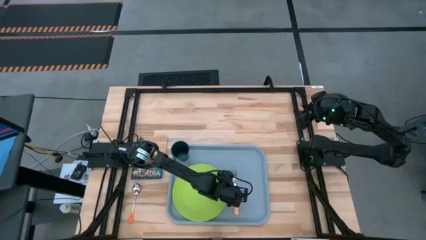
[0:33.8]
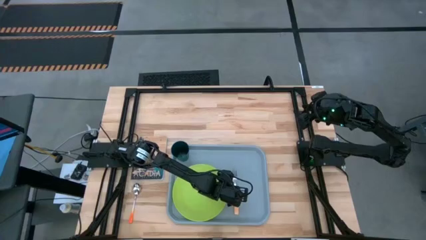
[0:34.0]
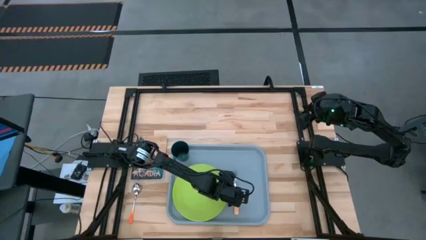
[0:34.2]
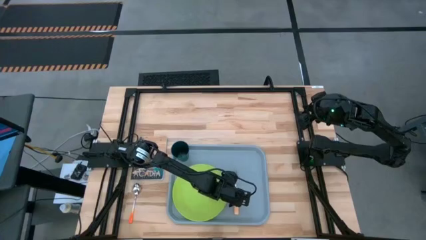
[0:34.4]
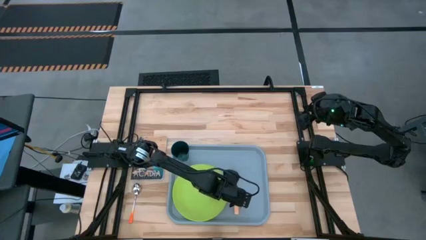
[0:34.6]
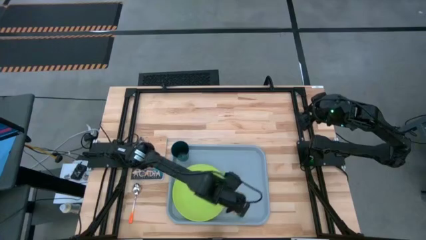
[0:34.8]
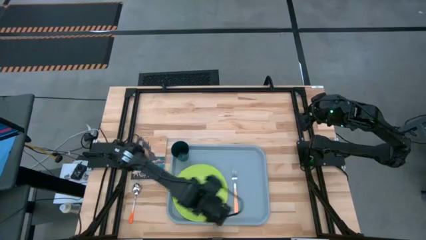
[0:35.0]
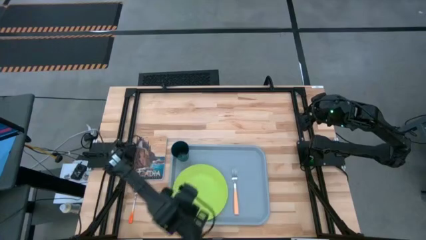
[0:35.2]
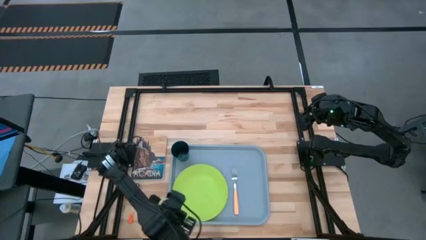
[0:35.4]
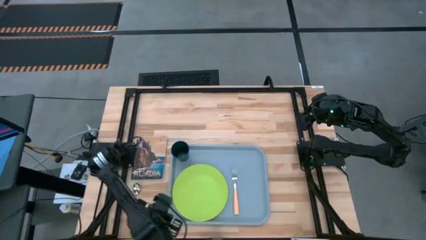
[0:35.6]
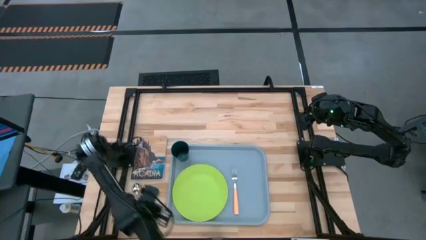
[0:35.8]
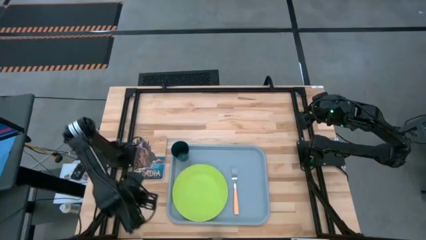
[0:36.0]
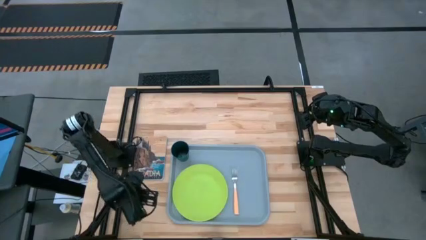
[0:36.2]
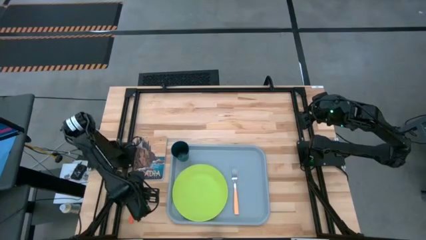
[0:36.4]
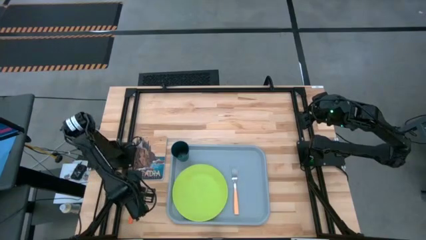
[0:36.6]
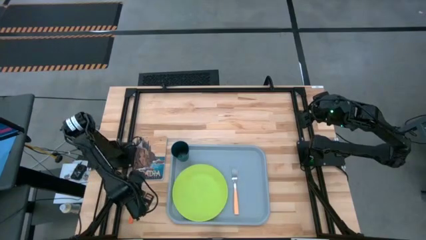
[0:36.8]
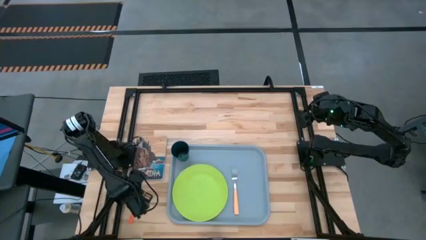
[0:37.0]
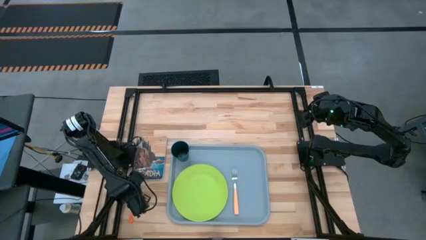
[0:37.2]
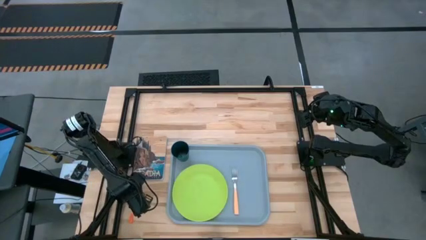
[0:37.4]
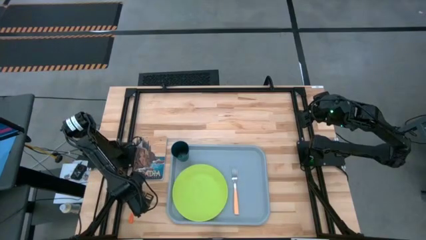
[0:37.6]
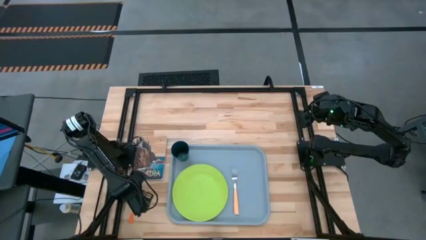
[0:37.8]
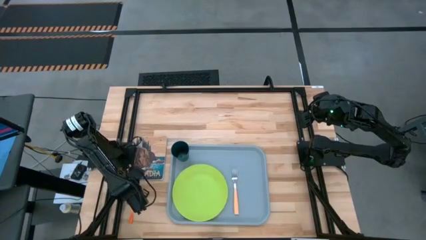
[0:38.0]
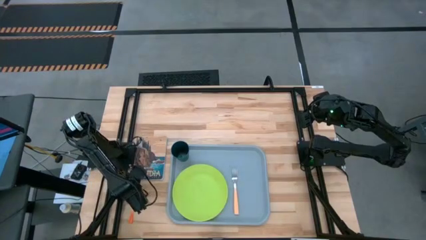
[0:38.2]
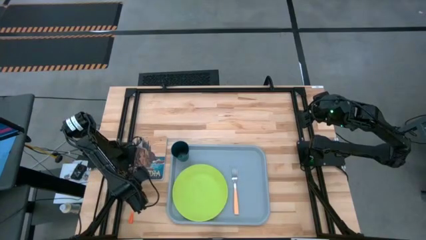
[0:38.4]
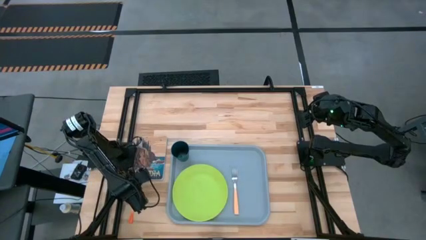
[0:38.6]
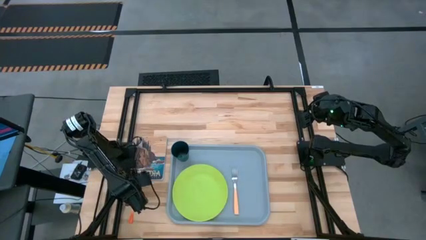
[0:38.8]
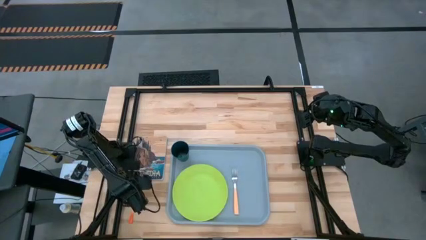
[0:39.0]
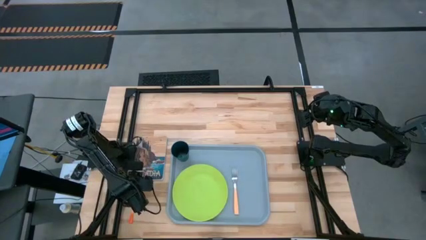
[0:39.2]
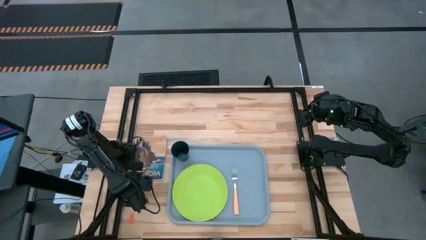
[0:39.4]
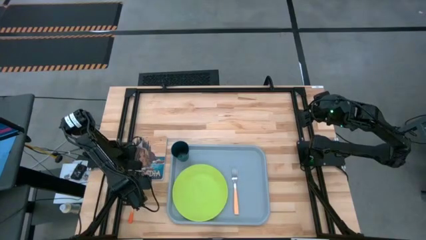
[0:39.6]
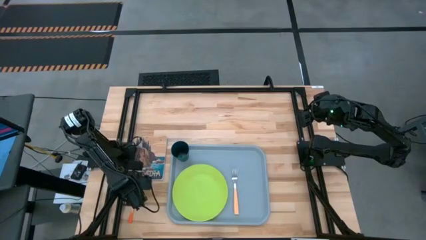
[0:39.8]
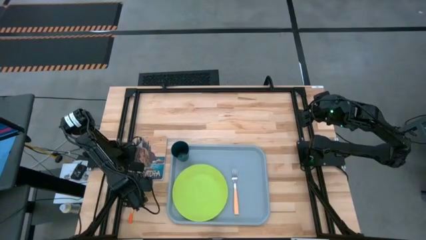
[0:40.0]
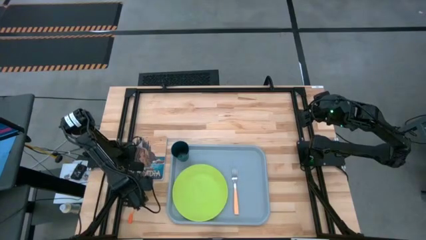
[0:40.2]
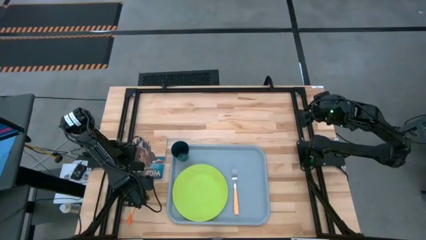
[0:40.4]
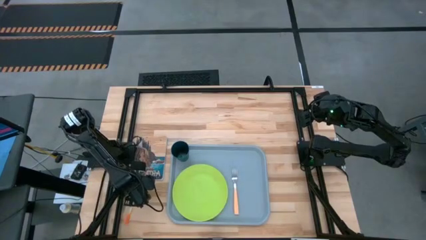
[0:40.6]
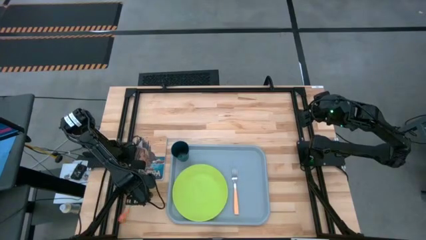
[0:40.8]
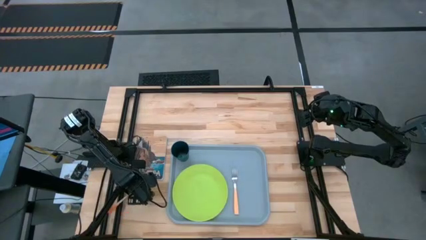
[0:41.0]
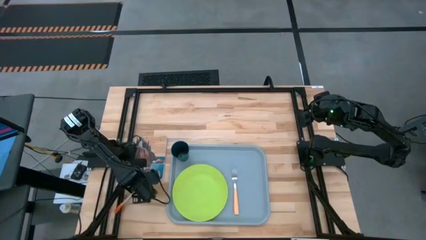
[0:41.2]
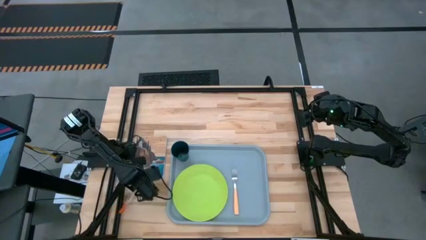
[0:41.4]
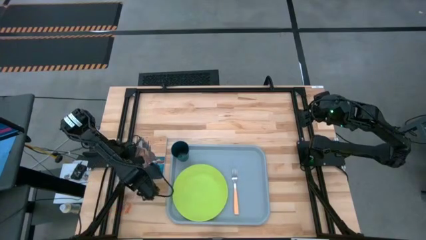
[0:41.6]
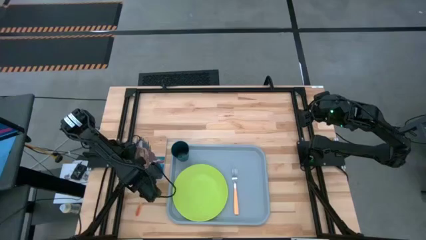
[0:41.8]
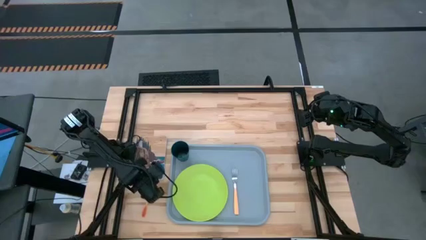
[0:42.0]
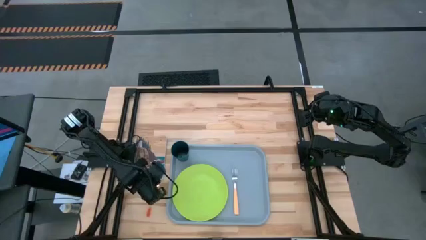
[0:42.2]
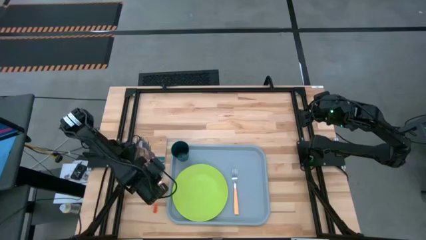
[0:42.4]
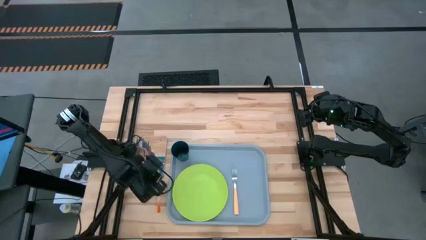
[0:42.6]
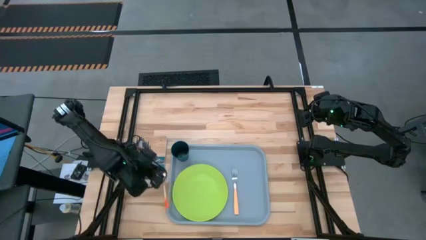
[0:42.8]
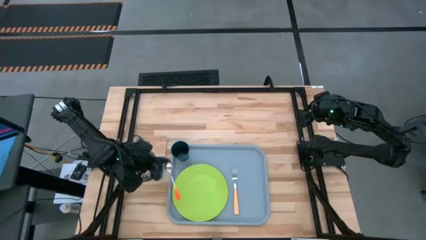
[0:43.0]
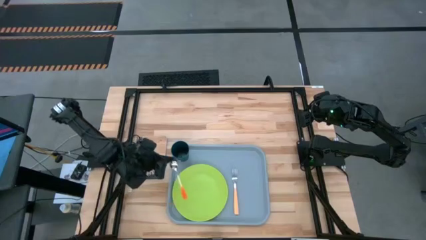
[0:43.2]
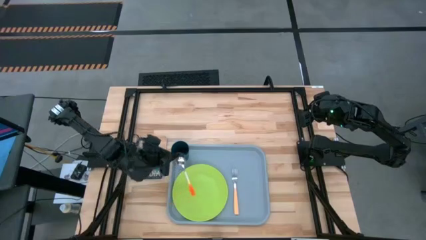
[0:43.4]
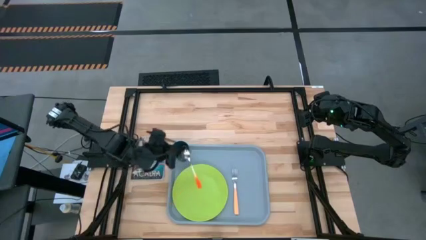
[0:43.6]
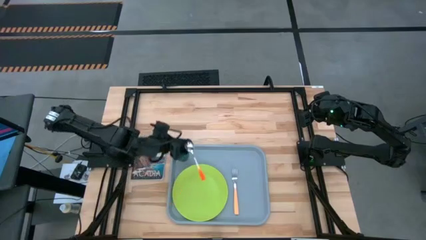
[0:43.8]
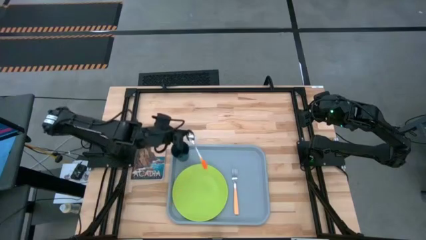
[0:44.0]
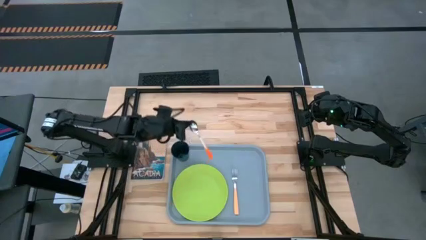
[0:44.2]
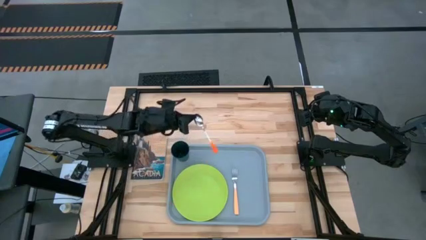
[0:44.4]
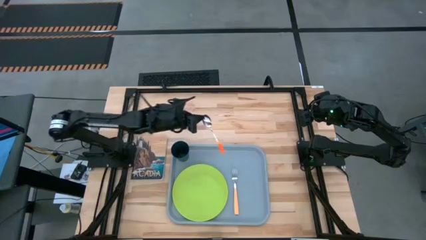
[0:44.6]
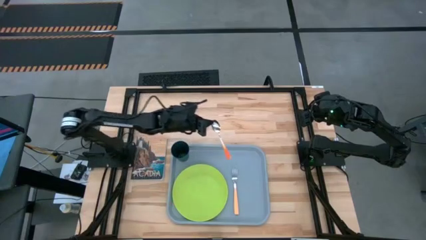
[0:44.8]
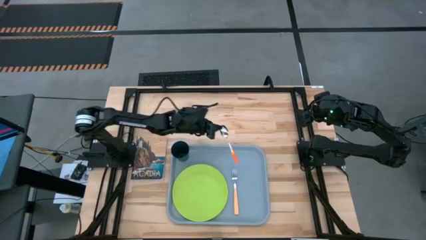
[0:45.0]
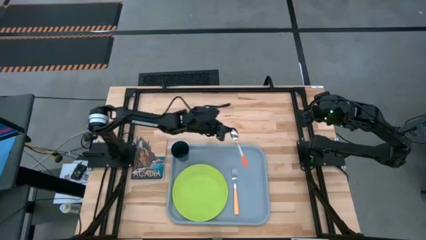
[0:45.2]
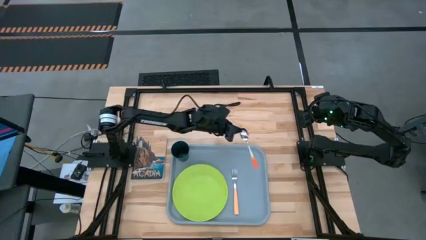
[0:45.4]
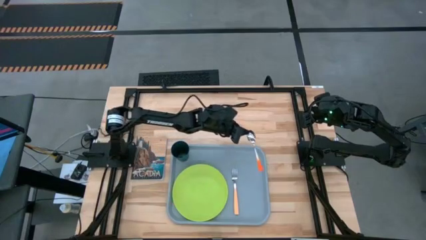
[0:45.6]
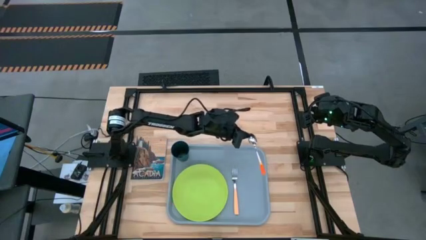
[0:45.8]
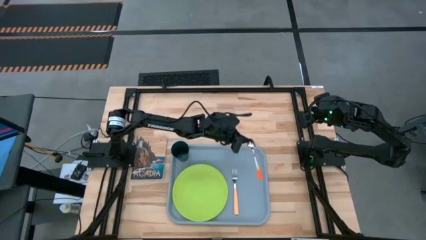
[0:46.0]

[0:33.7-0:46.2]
Task: Pick and place plate/cup/fork/spoon on tray
Put the orange spoon on the gray serving tray to the right of the orange fork

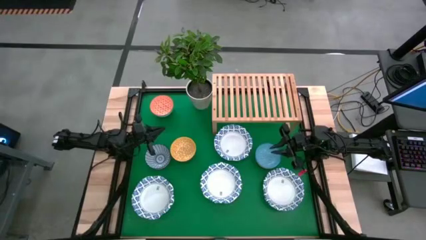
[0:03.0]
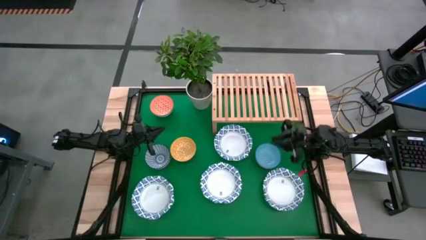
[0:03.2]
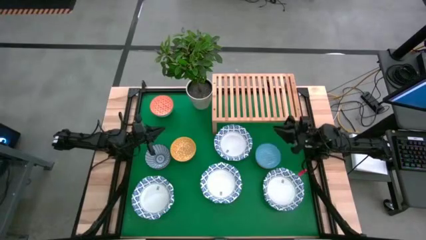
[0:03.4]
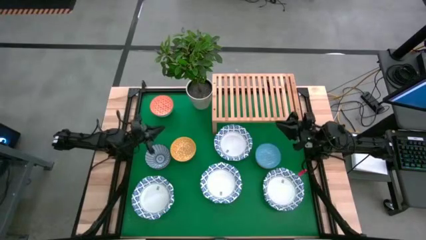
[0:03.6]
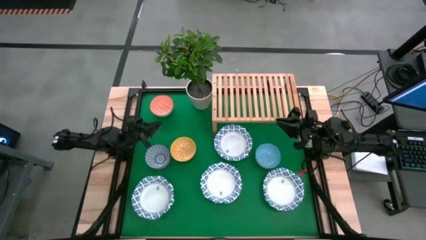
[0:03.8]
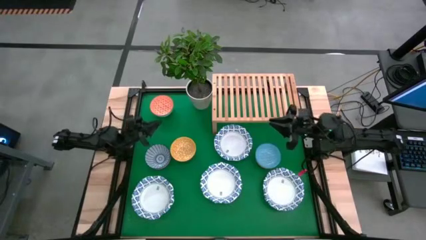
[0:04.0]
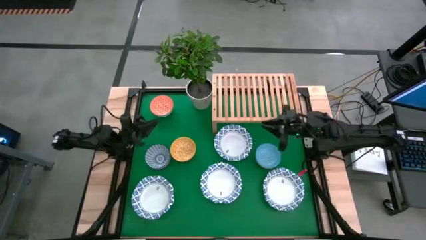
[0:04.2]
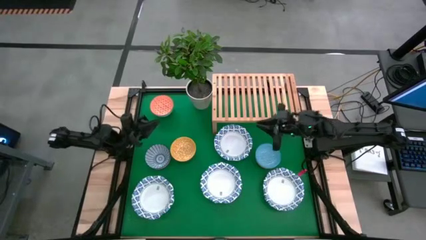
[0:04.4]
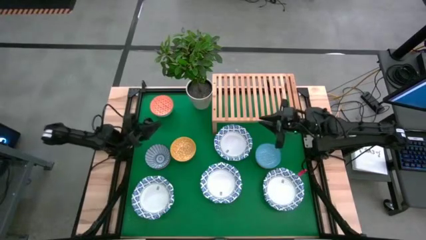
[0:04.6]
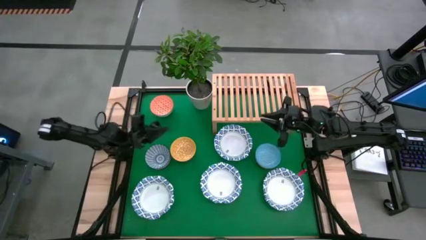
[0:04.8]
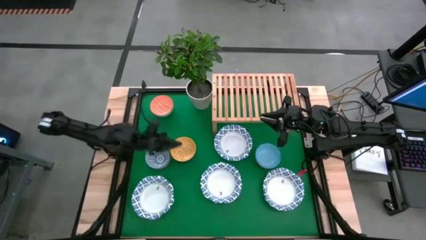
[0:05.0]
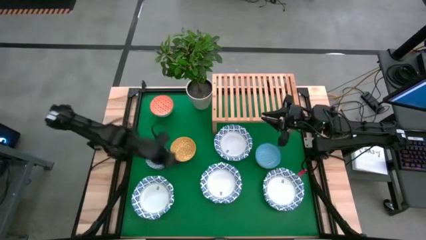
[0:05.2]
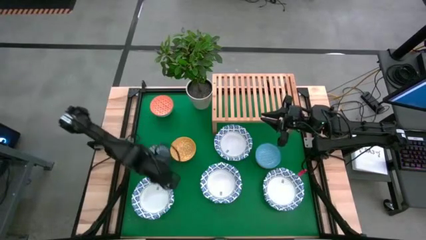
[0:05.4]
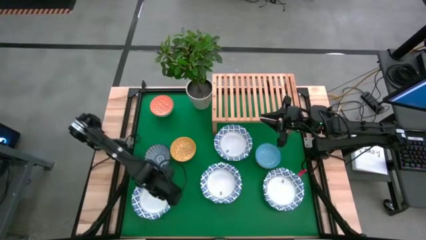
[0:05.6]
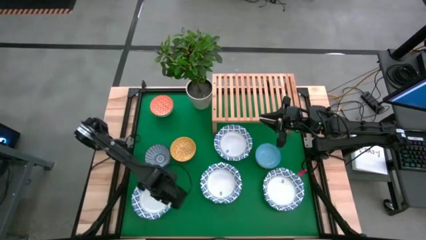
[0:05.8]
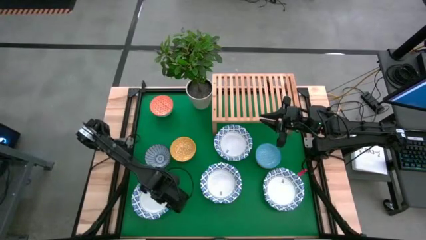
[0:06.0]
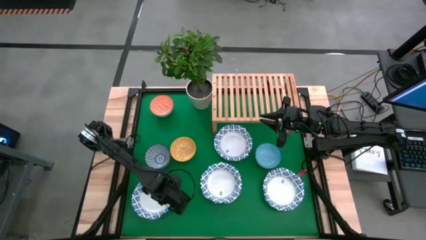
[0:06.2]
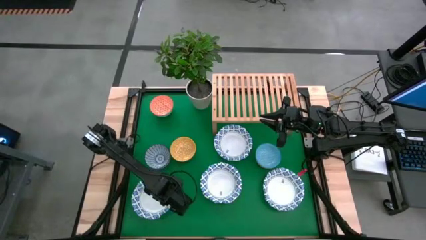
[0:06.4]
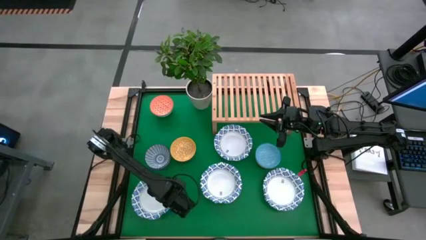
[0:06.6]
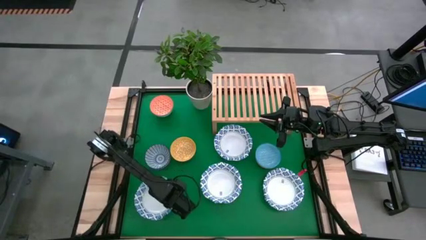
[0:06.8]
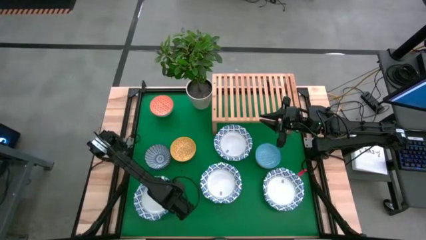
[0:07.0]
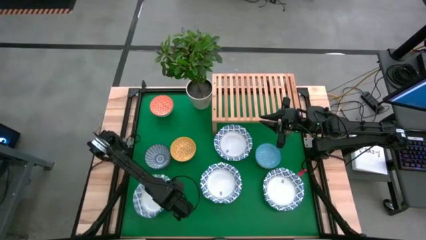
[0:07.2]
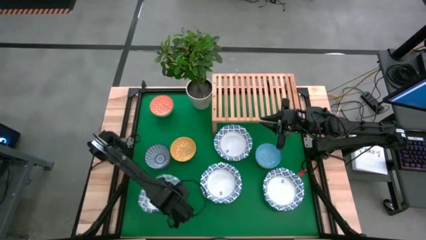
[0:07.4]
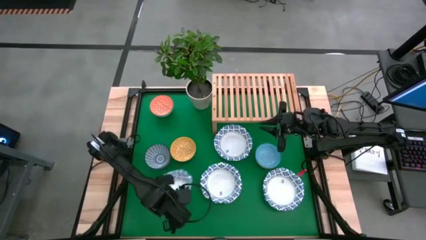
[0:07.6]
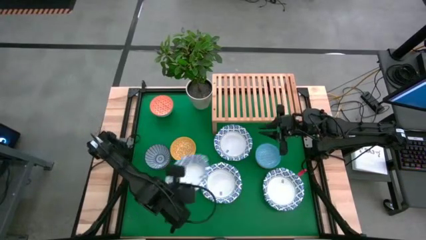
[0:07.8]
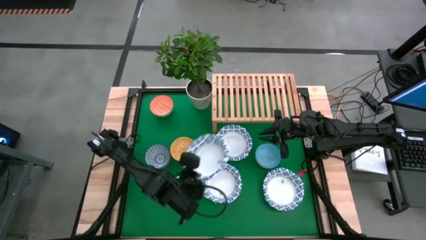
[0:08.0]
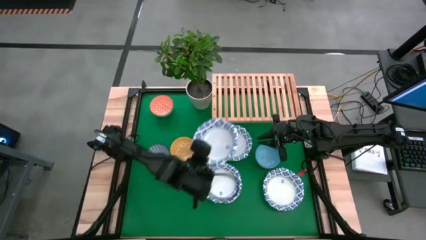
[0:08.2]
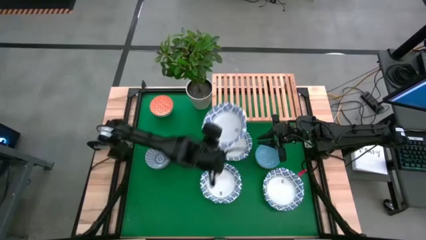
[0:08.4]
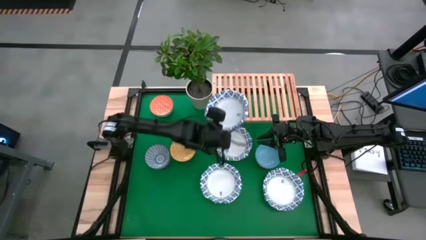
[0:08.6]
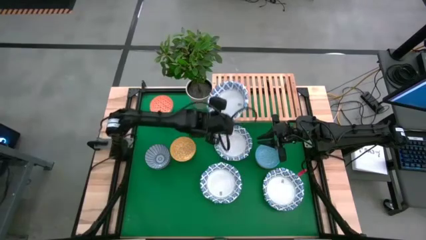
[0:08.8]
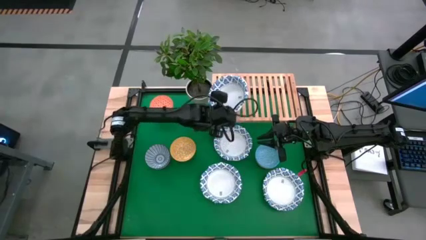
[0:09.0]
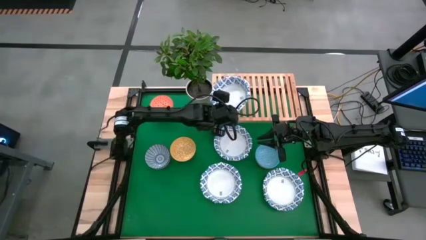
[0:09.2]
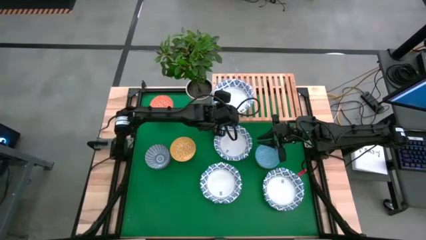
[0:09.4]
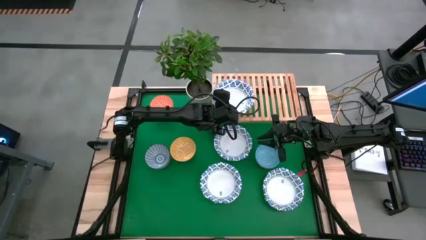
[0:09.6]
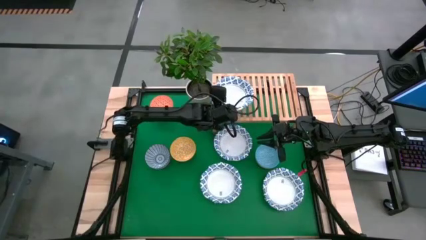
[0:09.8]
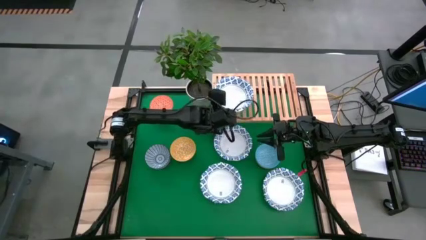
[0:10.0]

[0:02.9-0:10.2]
Task: Place and stack bowls onto a shelf
Put the bottom left white plate on the shelf
